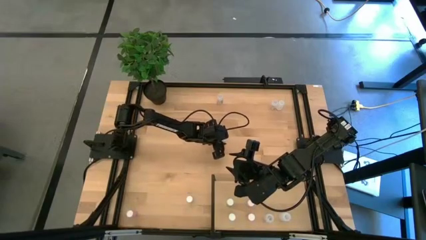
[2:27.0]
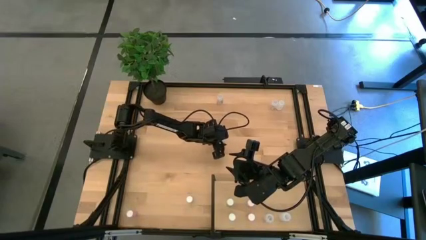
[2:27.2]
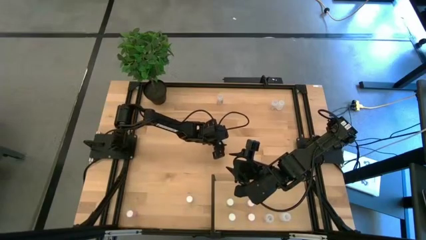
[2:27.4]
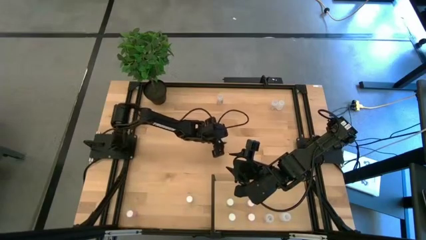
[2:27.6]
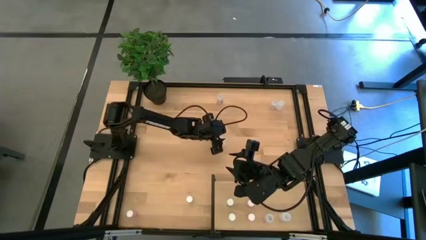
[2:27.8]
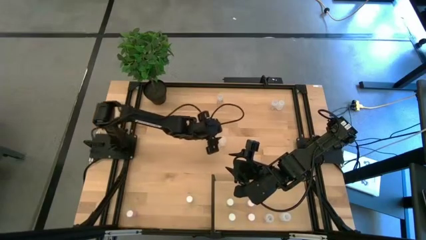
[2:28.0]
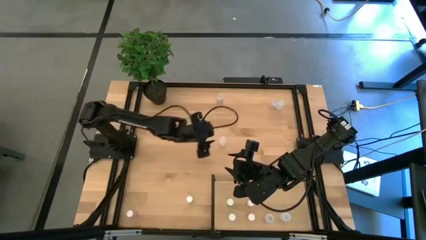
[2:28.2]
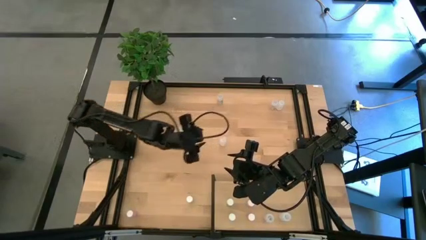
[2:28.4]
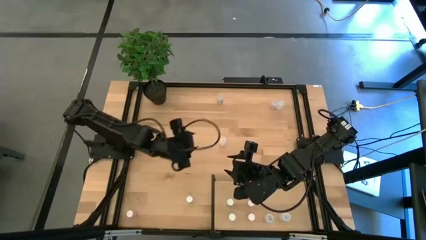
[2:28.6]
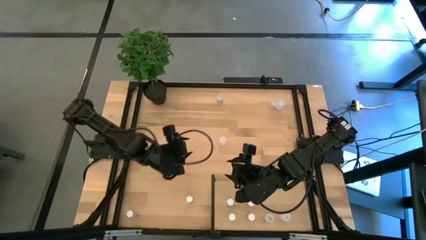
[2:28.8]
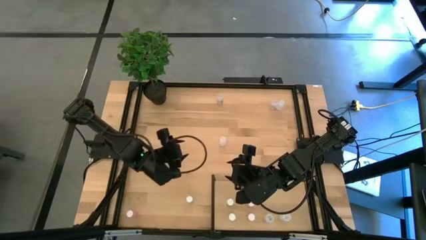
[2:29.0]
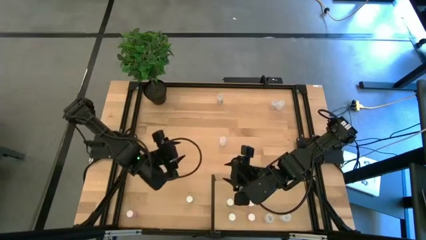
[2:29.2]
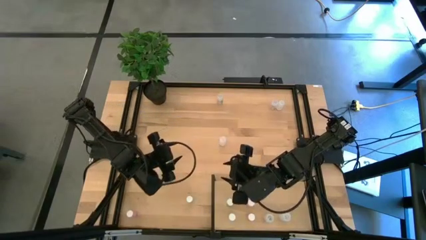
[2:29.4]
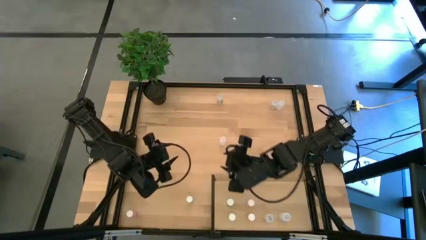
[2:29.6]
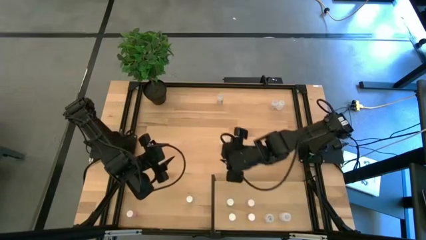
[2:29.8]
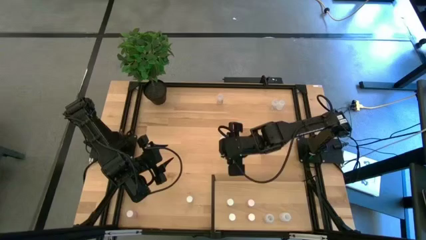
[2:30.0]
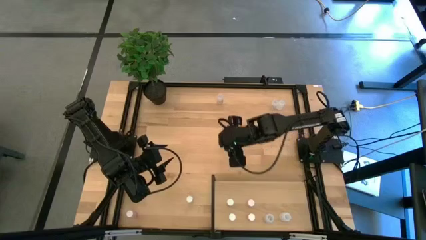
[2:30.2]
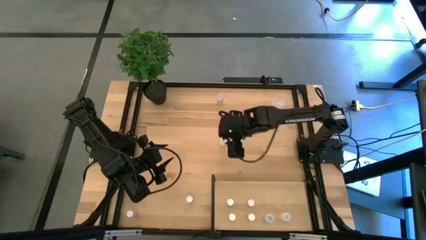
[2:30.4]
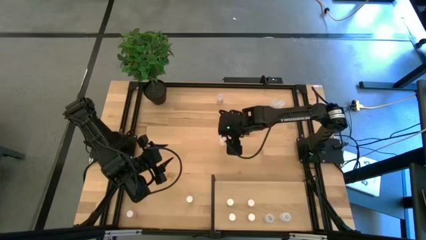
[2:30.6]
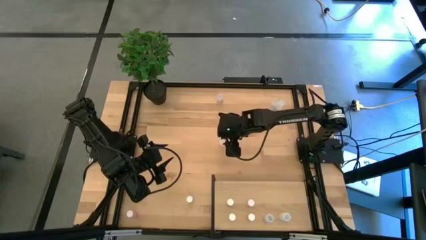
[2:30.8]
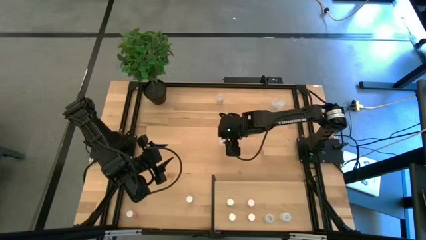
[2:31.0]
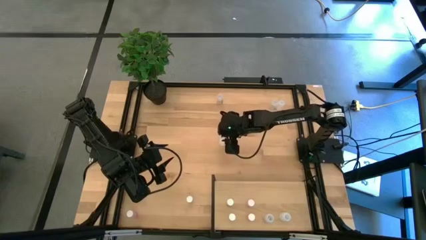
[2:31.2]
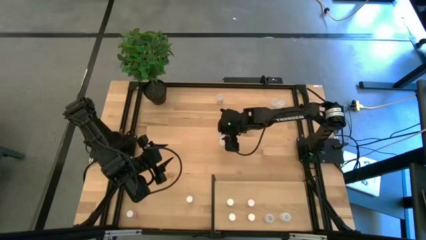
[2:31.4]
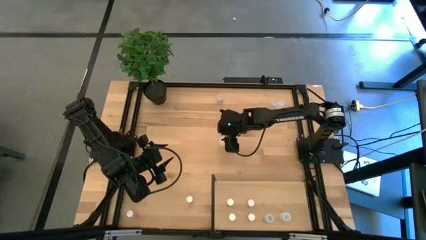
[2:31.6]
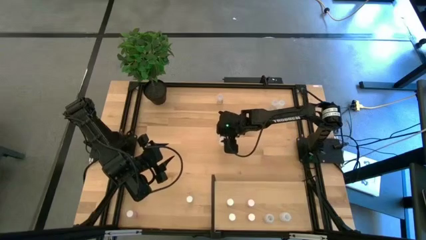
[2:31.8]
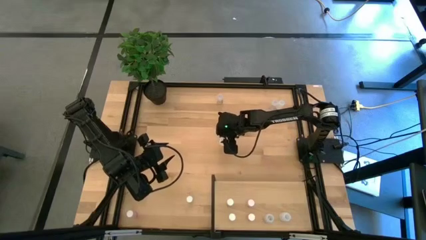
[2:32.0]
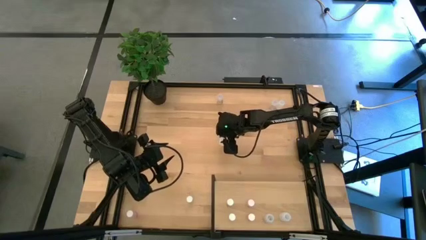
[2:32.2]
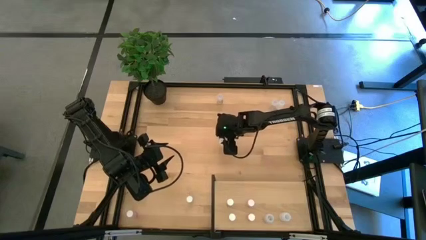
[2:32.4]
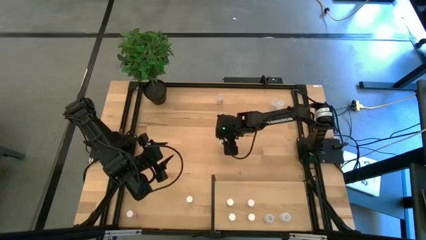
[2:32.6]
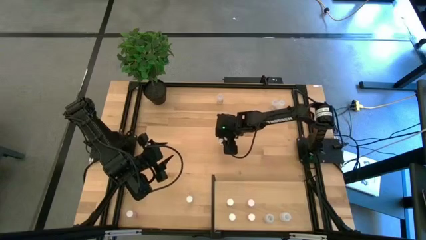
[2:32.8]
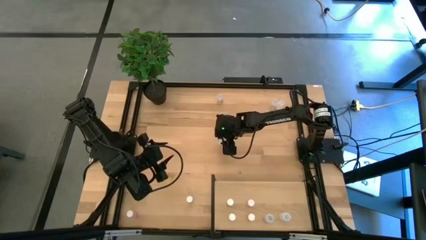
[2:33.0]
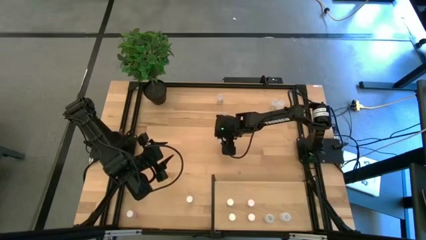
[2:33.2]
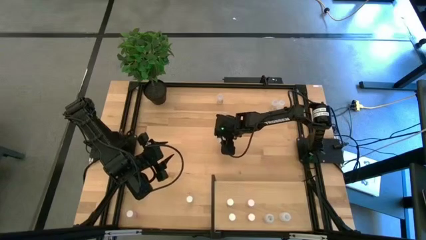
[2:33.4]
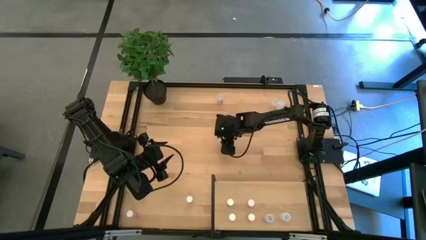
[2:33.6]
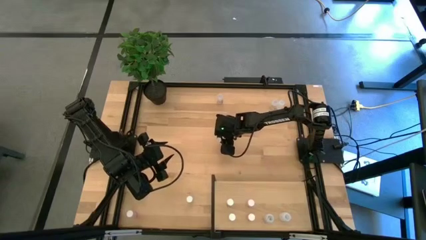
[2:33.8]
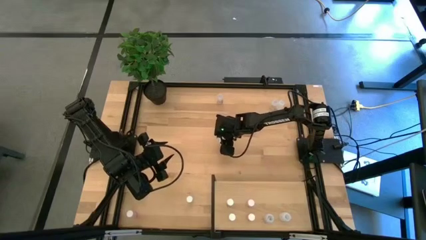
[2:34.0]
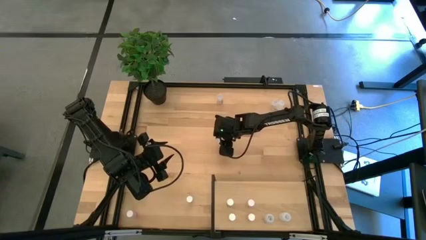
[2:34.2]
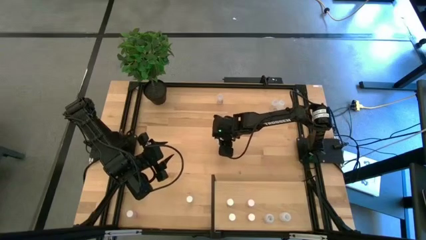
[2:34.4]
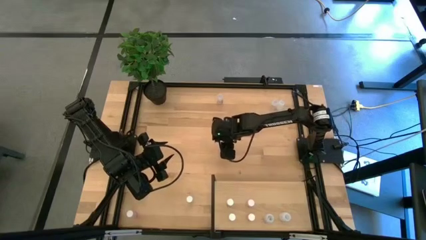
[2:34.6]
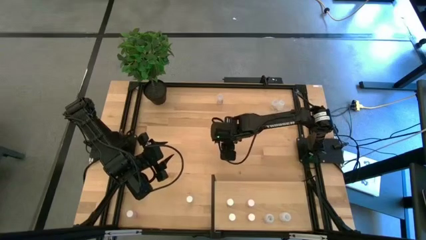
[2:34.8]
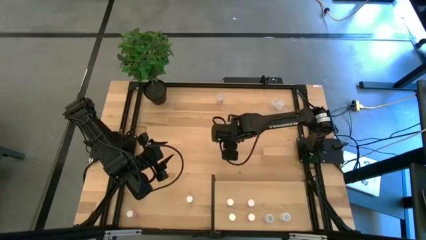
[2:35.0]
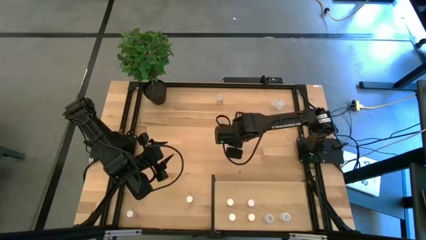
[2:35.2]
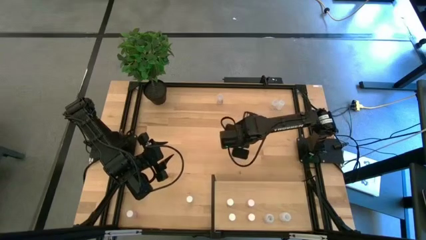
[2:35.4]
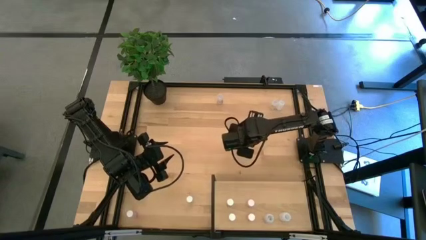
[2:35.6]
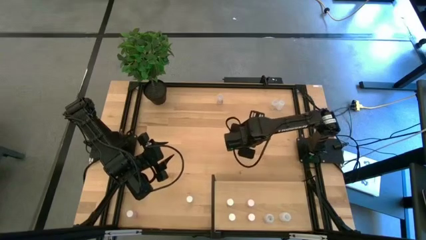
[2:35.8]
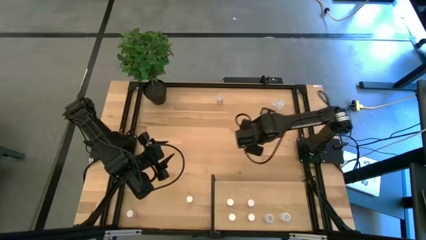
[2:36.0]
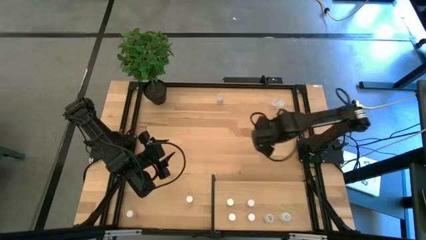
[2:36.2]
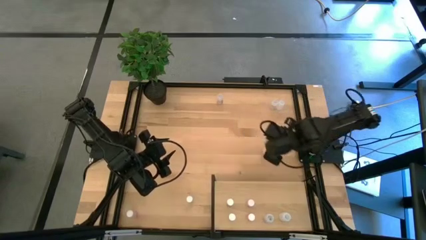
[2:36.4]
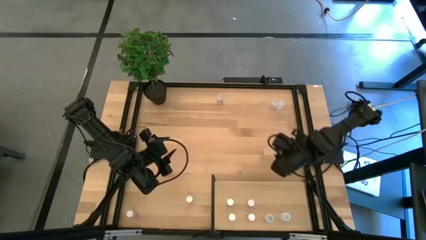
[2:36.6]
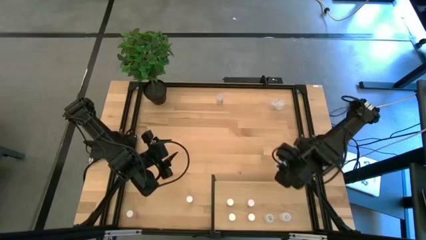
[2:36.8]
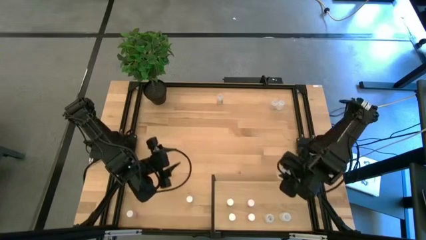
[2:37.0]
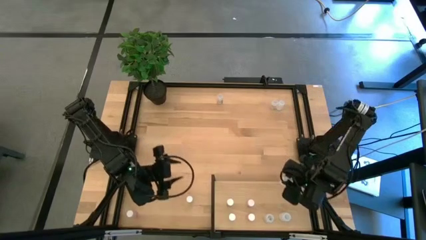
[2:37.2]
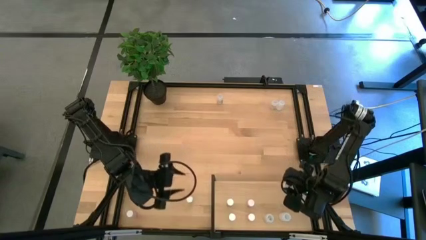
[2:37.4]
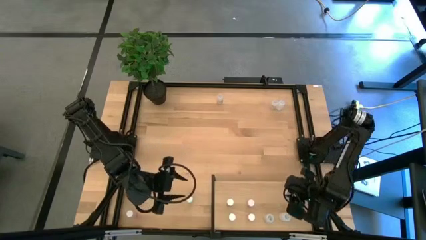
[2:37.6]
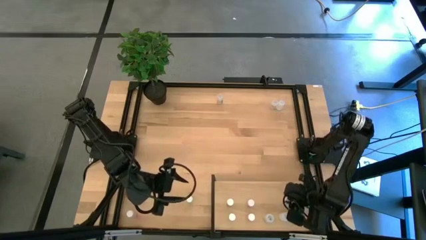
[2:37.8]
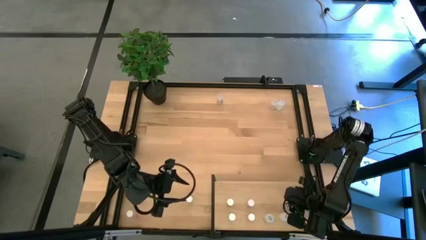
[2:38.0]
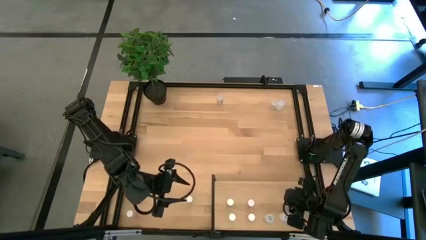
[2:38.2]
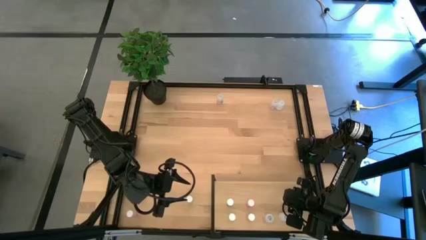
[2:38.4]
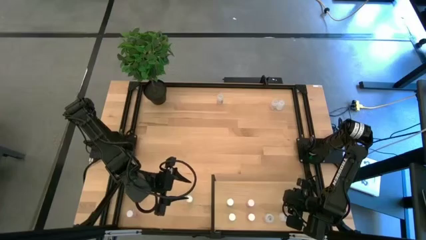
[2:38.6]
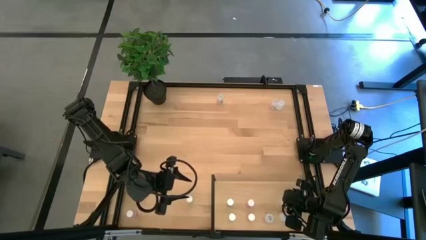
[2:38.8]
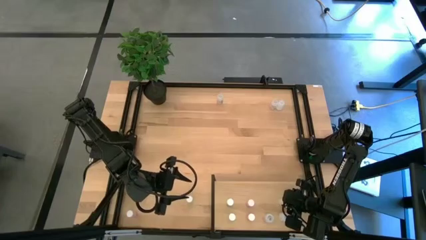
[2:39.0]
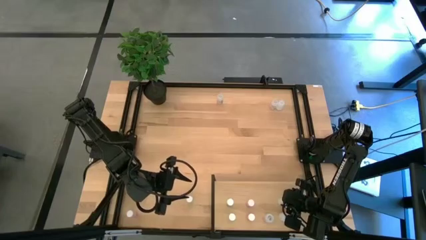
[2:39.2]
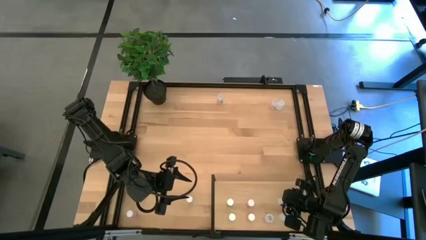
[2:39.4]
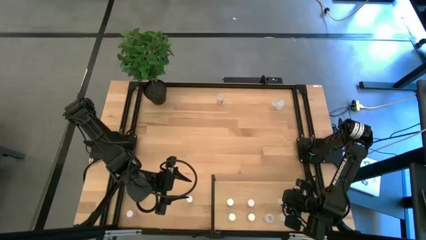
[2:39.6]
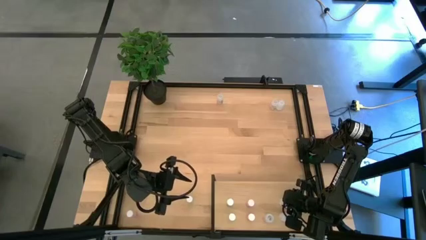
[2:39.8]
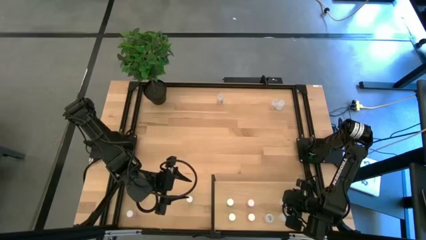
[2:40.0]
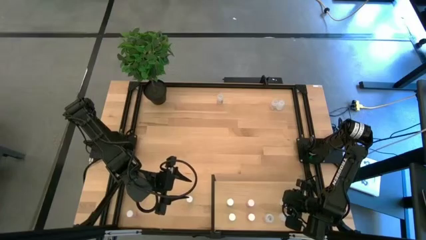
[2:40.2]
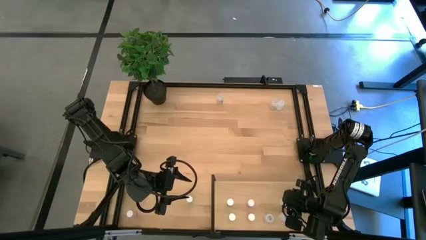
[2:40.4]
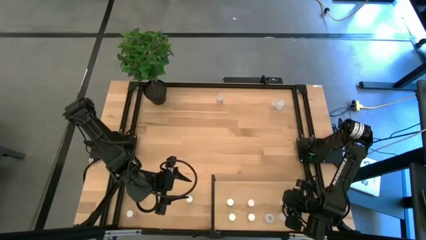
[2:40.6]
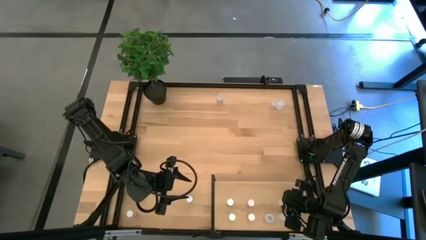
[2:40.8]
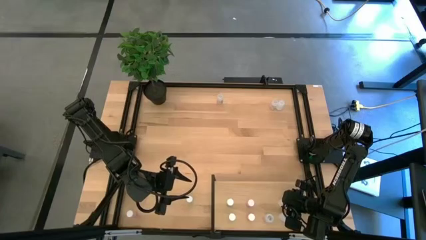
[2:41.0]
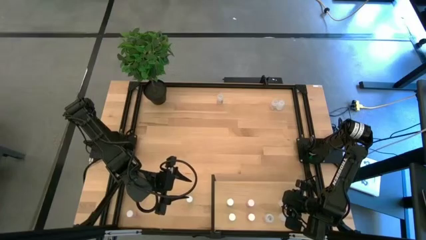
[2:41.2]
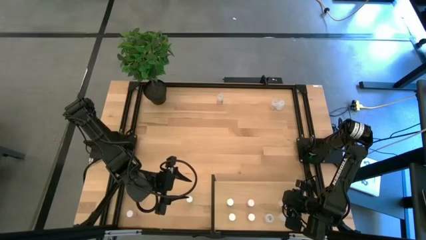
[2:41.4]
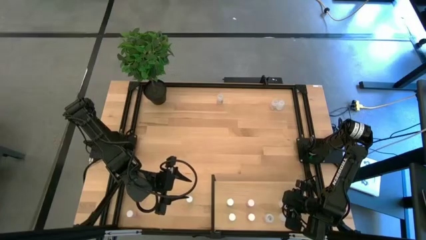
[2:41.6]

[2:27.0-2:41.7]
Task: Pick and place medicine bottles onto shelf by color
Put the bottom white pill bottle on the shelf aligned with the other white pill bottle
